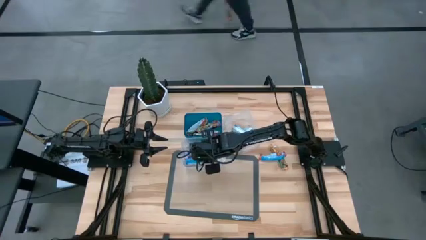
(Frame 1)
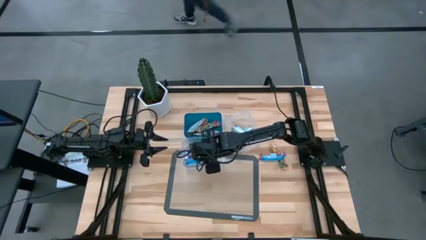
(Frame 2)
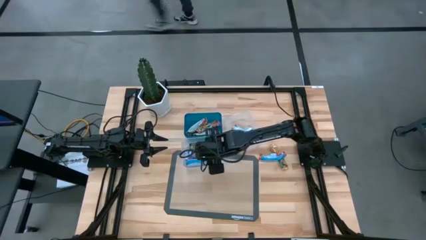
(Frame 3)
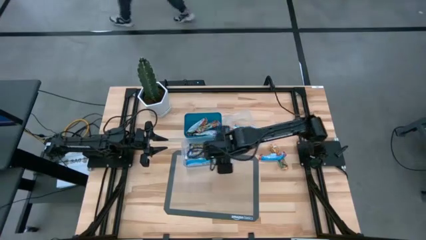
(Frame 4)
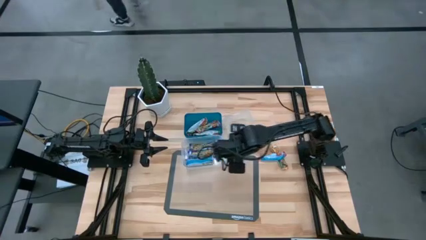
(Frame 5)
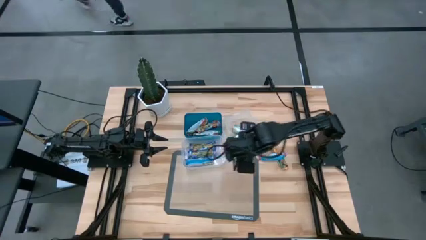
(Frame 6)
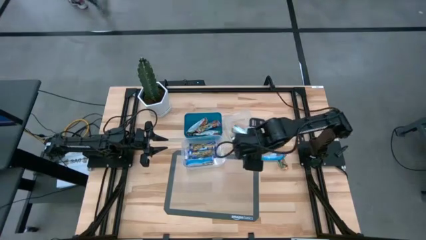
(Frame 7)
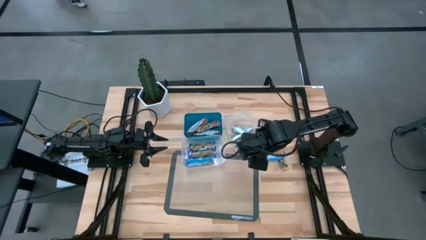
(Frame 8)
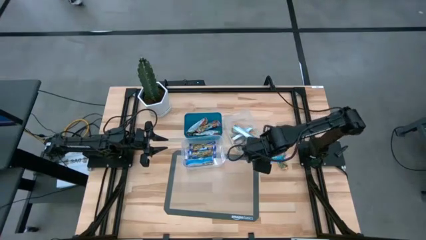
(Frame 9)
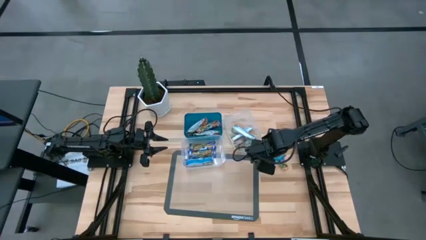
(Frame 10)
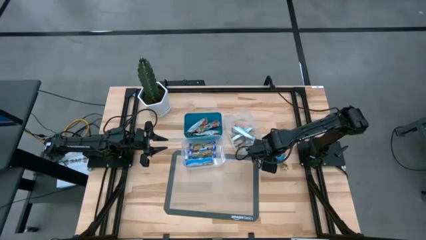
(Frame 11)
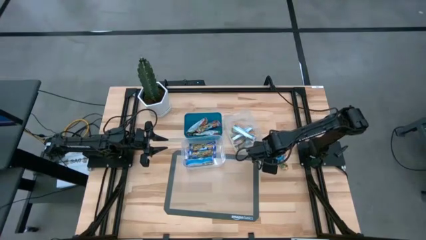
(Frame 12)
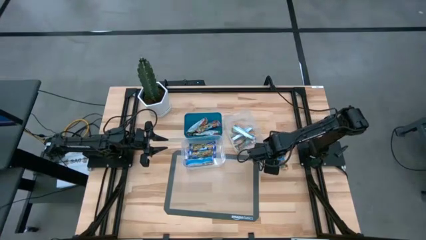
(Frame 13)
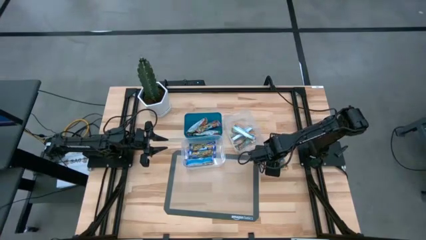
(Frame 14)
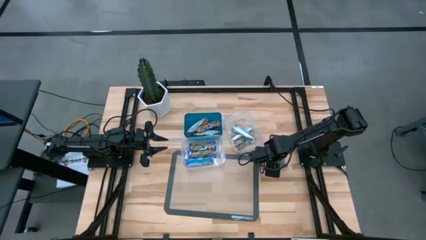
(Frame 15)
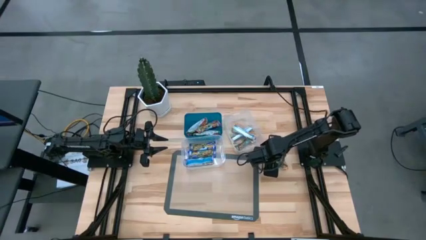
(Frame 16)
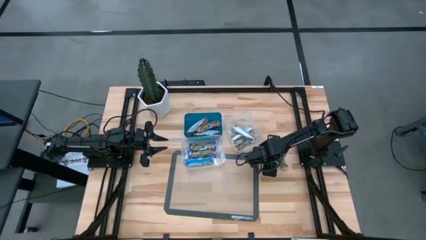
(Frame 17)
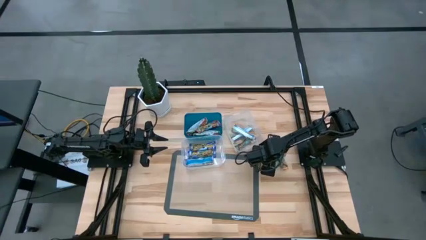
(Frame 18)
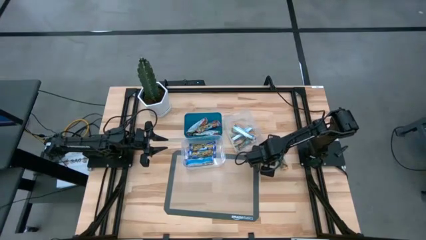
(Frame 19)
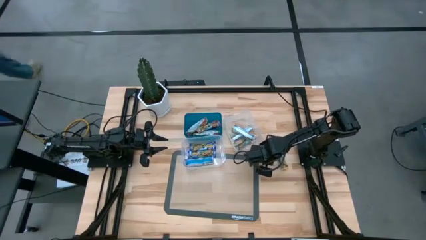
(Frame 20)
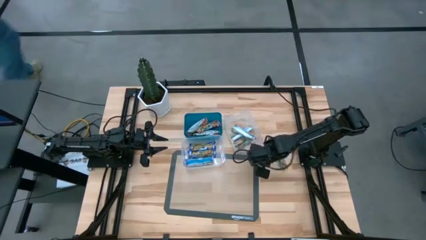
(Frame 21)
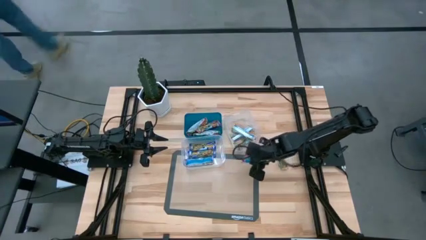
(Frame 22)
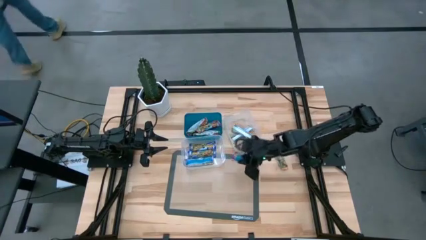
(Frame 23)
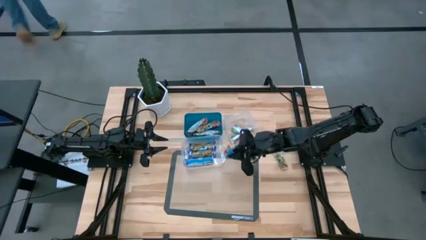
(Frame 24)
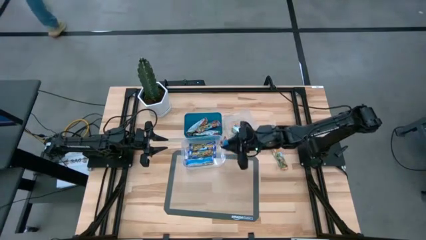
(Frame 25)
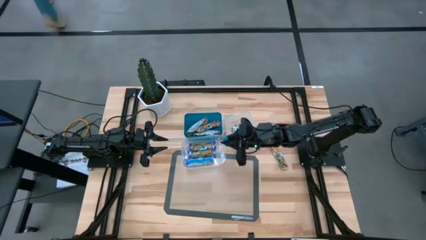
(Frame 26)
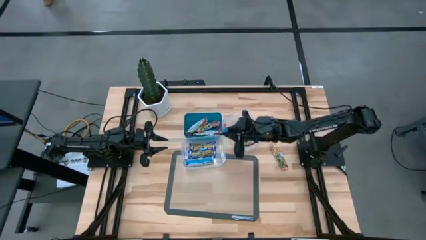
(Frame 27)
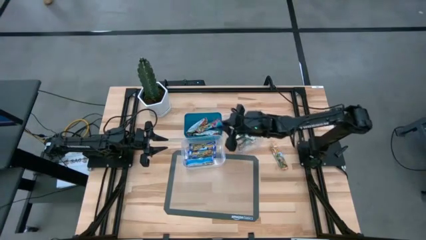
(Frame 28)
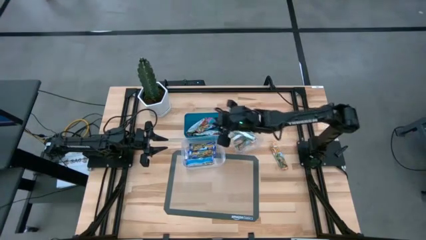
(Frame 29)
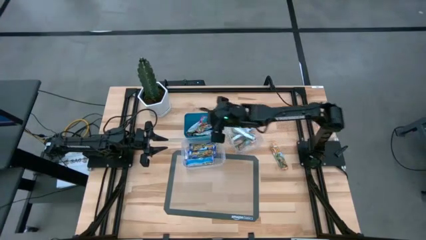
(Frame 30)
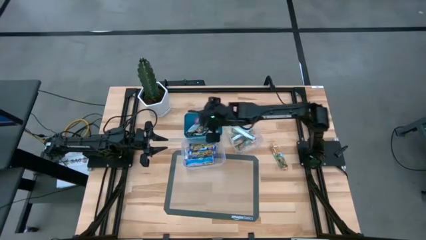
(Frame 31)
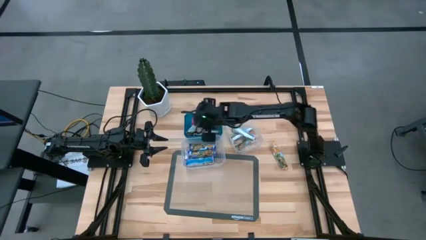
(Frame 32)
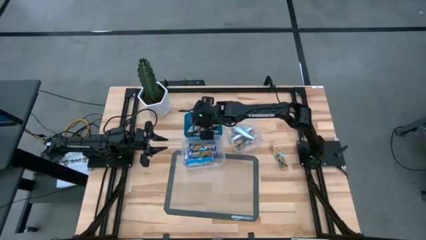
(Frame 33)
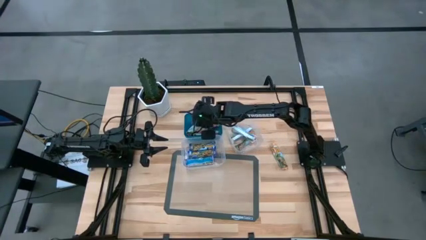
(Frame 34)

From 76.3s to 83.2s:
Task: Pick and place Granola Bars by type
Put the red granola bar into the blue bin

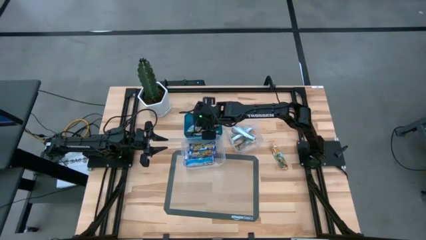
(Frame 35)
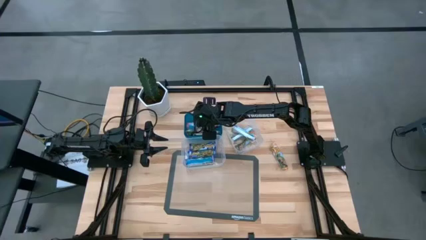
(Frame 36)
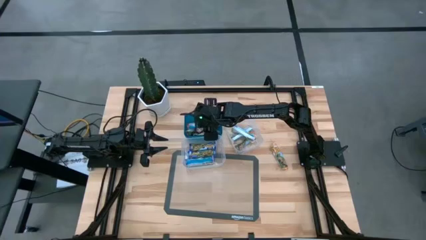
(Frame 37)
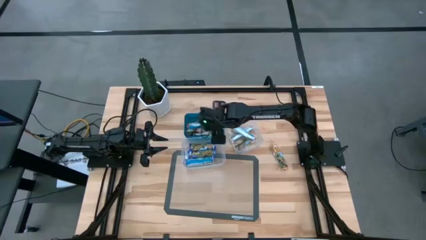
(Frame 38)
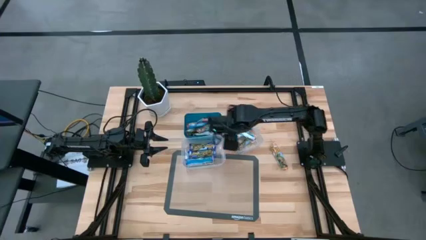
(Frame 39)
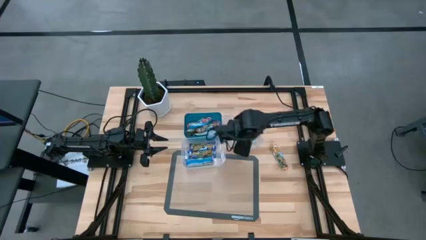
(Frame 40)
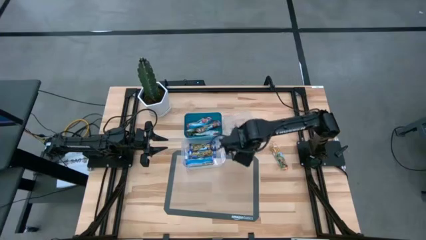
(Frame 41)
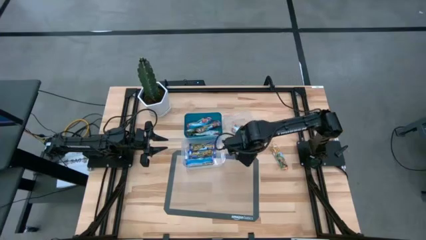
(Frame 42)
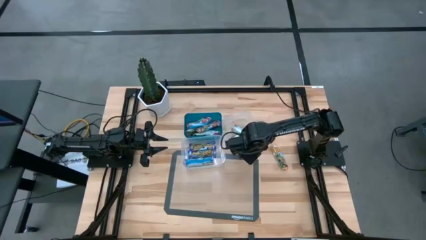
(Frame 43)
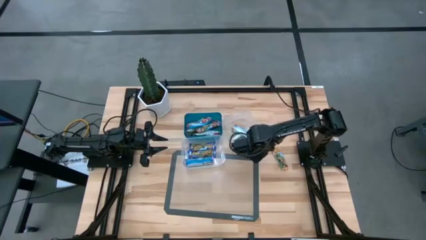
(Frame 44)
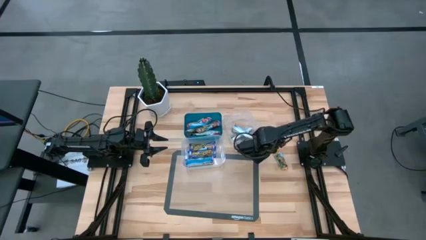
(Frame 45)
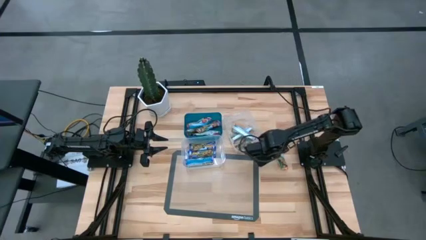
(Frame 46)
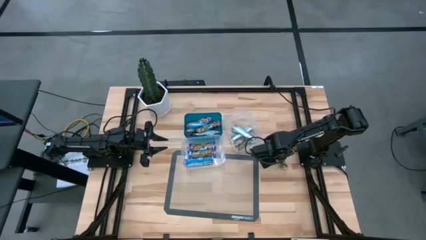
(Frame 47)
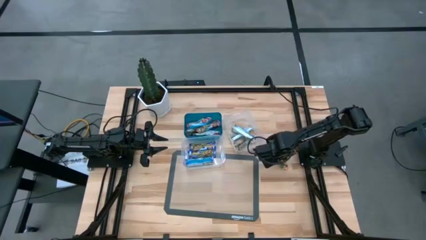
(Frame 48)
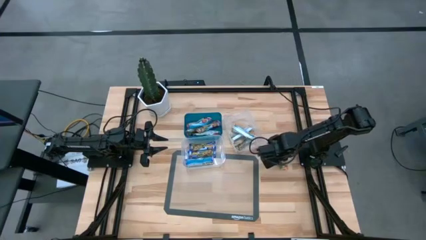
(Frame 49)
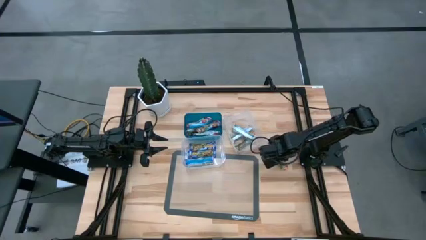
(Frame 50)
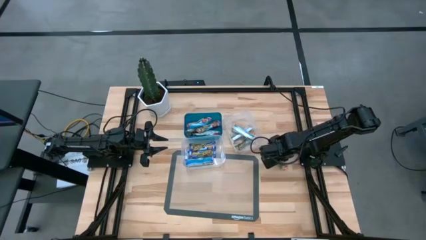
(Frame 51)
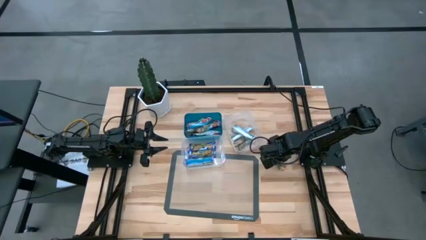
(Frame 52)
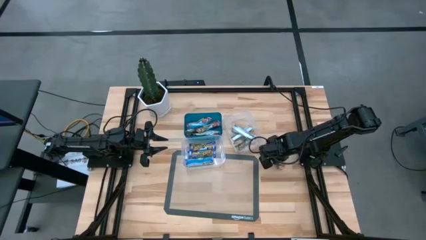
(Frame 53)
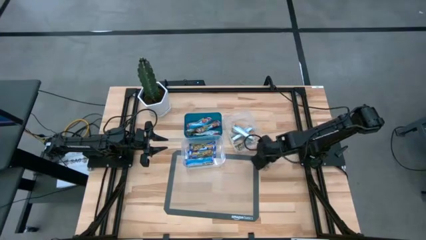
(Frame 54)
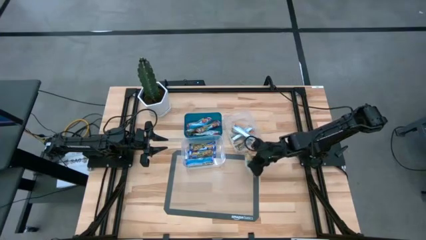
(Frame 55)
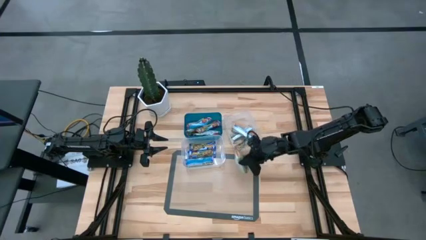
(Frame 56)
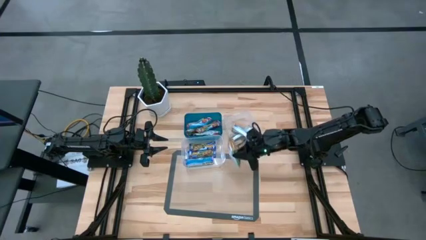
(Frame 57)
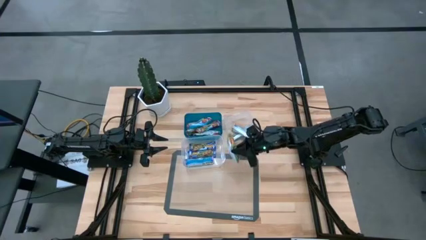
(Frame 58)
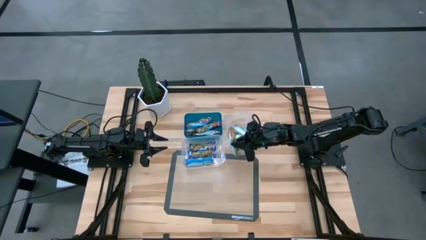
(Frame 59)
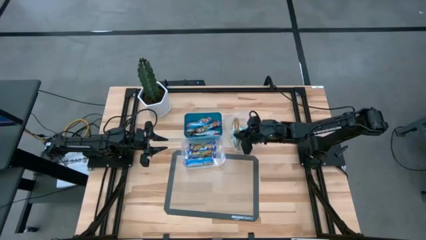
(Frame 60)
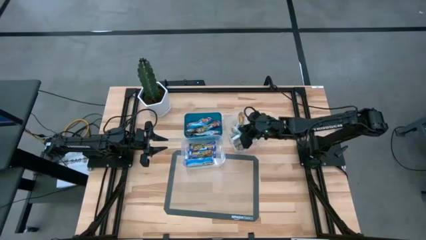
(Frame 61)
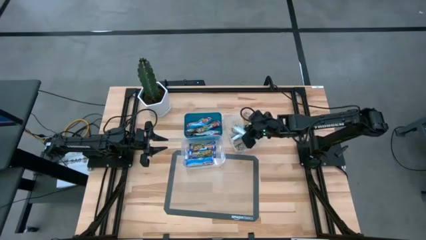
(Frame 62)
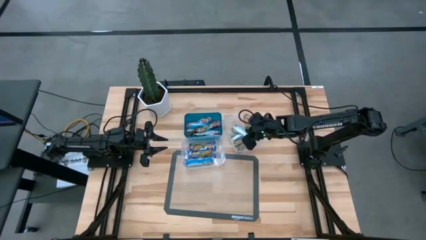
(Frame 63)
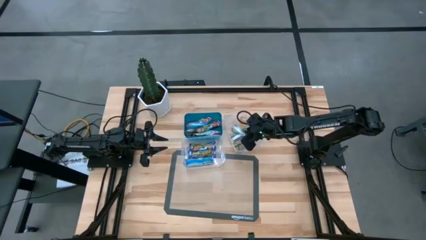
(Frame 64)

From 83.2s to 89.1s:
Put the orange granola bar into the right transparent bin

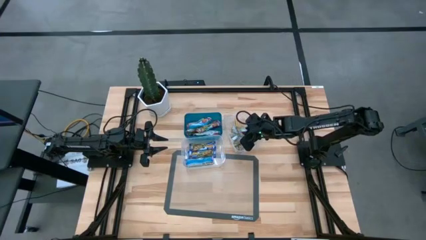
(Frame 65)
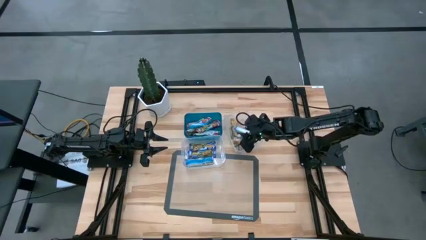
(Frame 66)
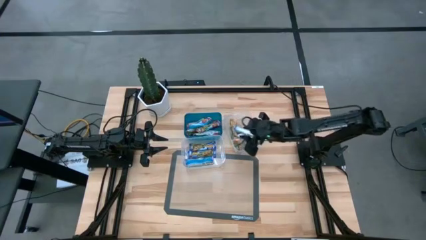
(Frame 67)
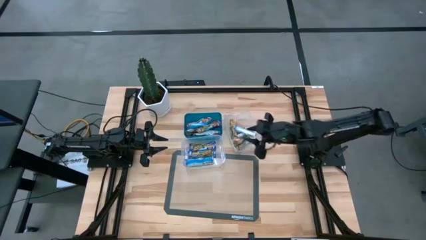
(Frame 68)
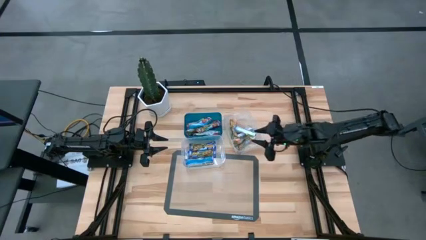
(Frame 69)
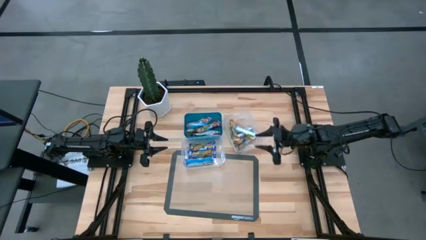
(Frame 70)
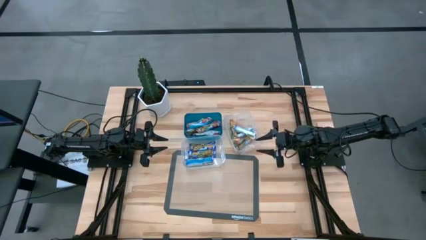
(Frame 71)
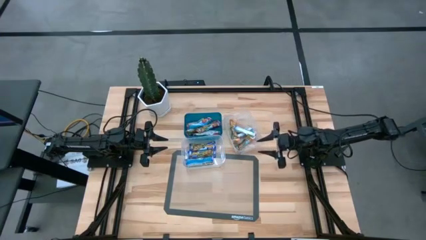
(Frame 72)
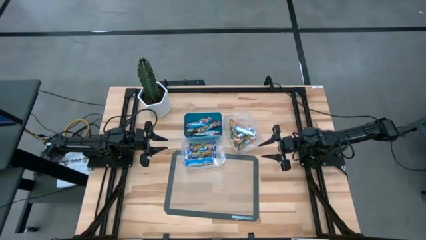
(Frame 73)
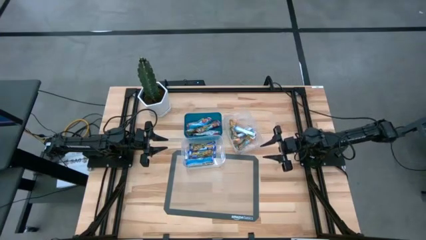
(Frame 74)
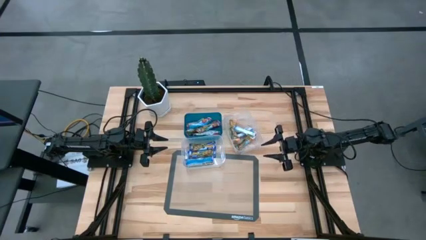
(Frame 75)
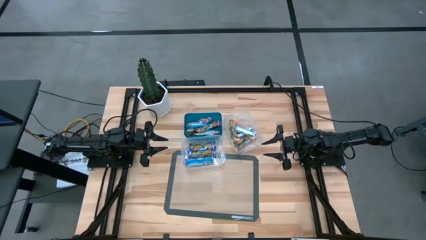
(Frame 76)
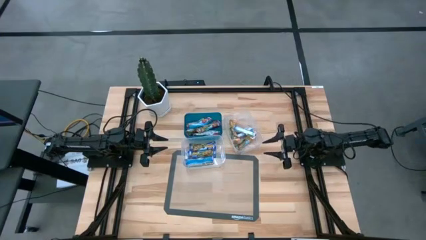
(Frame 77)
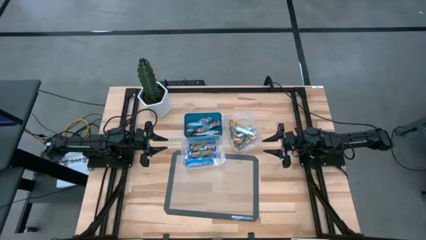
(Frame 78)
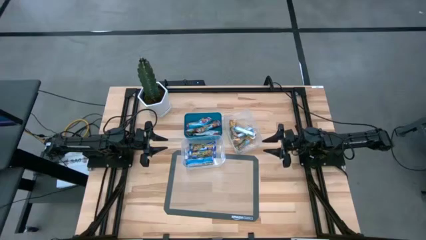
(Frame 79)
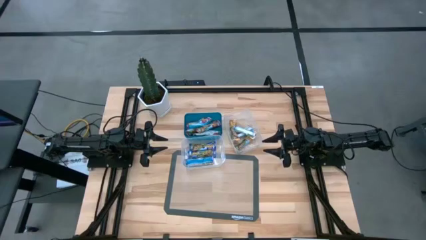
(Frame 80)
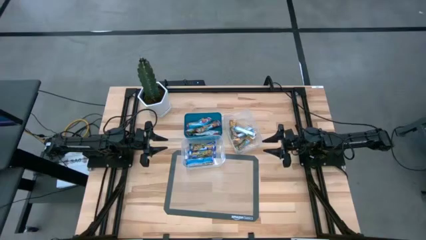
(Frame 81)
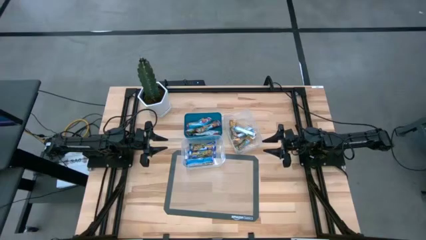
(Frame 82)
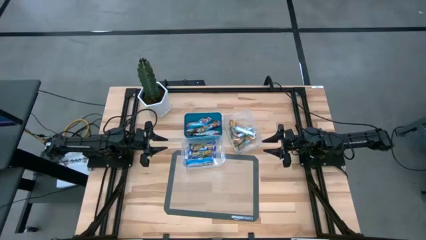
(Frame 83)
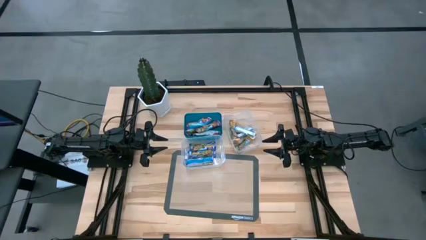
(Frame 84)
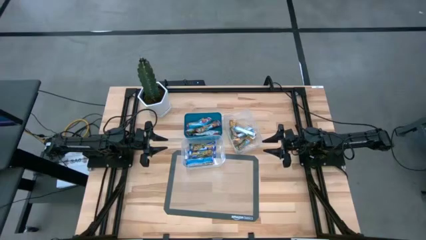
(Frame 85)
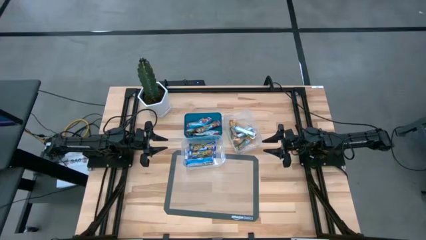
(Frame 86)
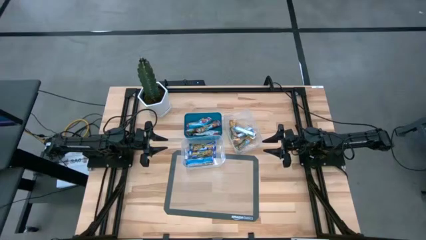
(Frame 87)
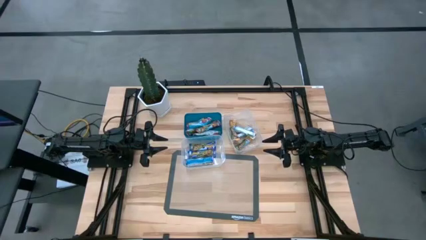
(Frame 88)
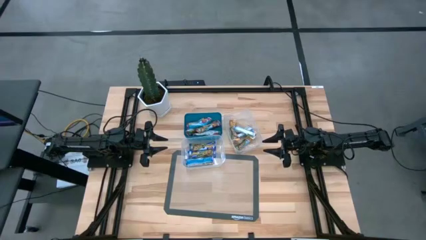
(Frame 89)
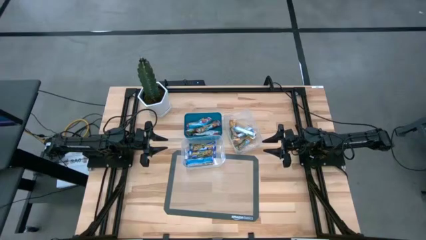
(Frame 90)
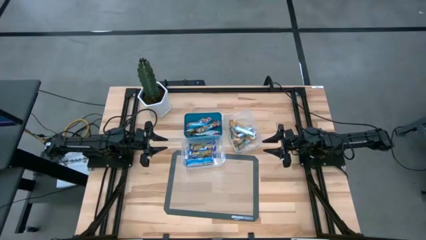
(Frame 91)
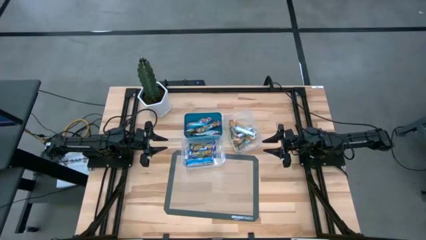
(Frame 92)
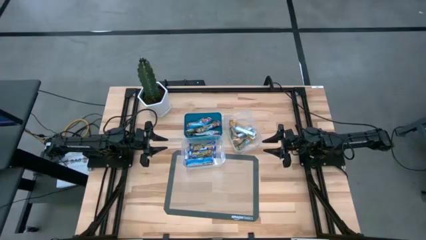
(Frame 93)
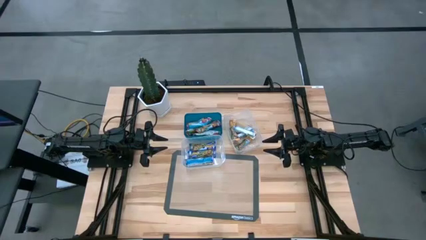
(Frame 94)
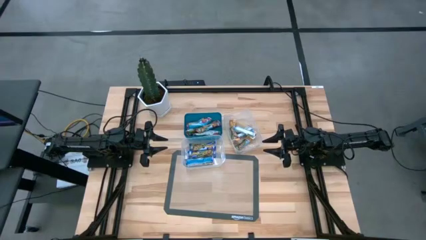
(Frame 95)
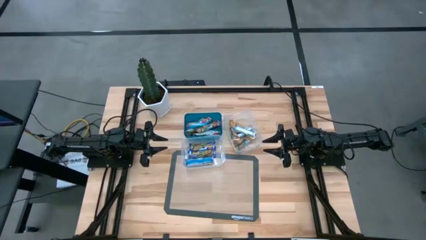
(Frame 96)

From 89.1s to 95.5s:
Return to Home Position
